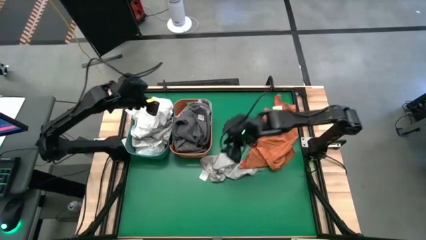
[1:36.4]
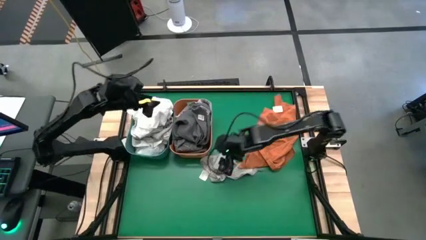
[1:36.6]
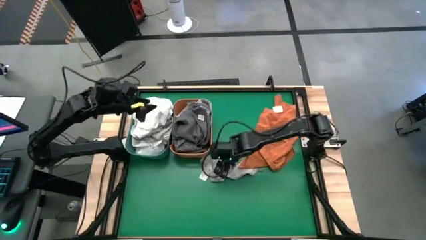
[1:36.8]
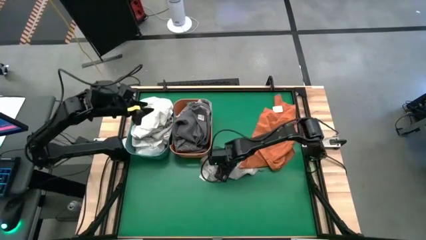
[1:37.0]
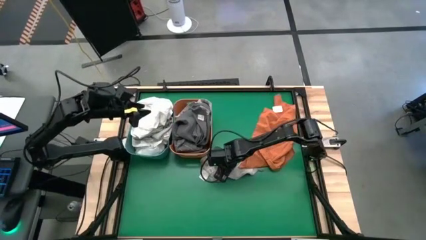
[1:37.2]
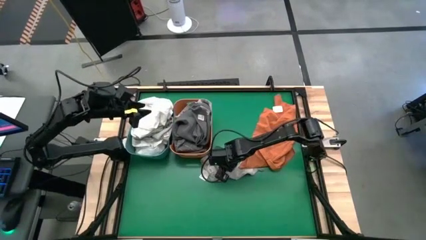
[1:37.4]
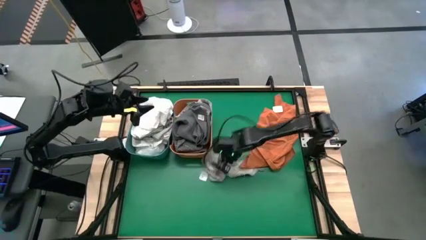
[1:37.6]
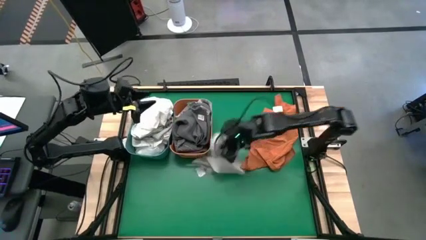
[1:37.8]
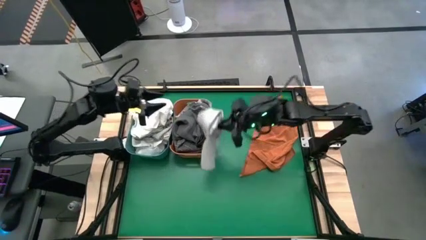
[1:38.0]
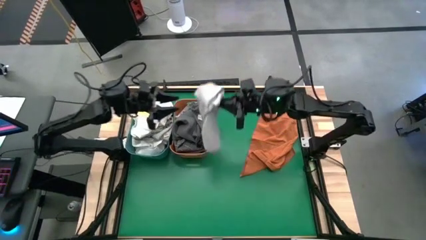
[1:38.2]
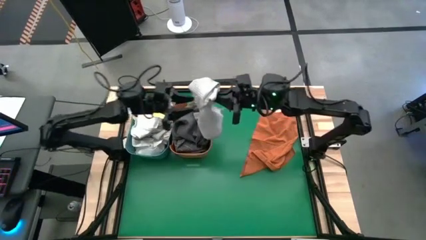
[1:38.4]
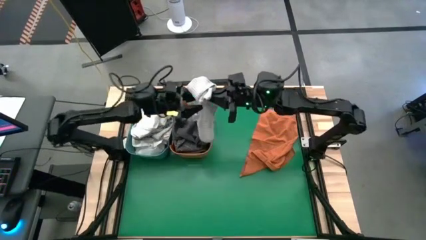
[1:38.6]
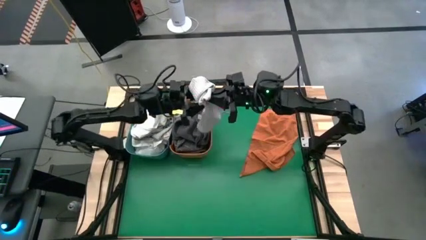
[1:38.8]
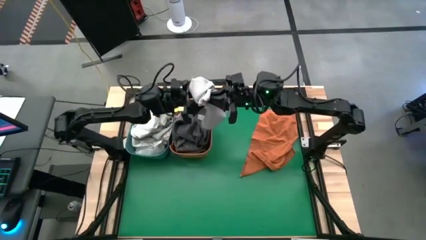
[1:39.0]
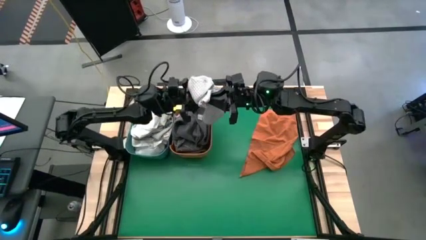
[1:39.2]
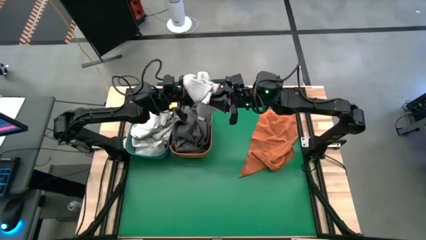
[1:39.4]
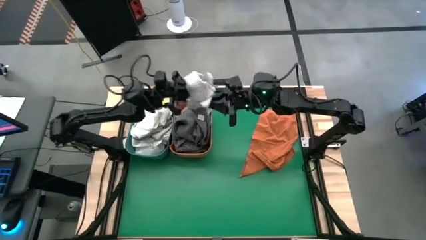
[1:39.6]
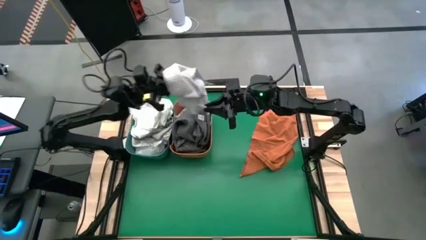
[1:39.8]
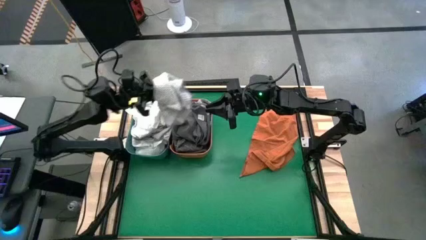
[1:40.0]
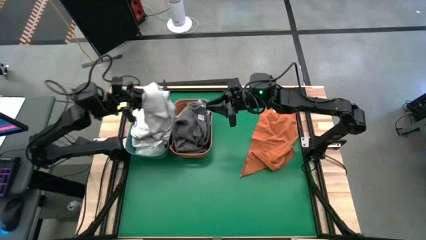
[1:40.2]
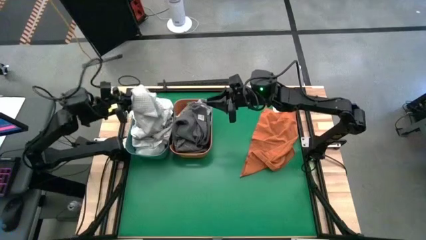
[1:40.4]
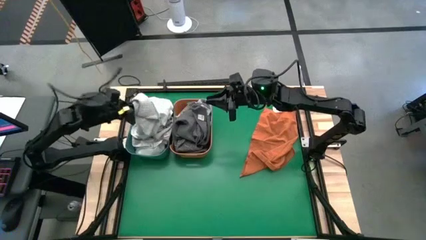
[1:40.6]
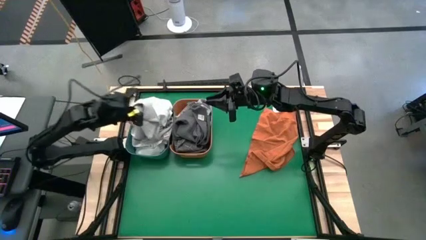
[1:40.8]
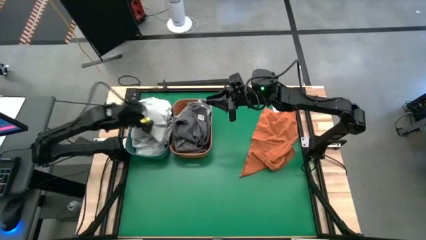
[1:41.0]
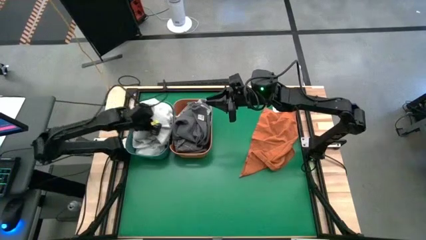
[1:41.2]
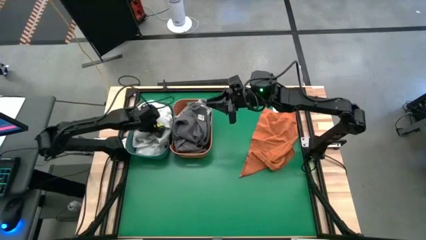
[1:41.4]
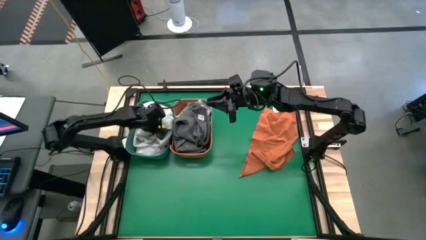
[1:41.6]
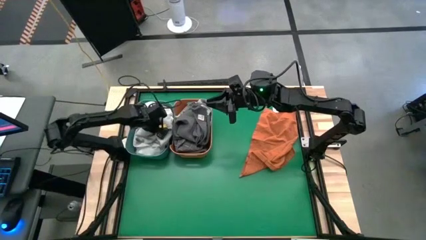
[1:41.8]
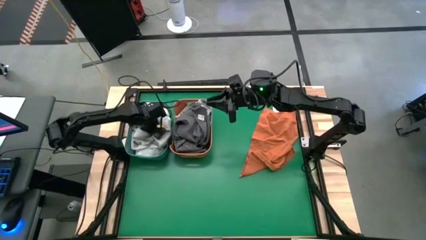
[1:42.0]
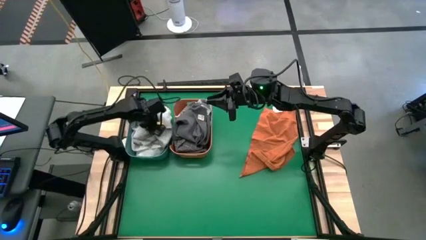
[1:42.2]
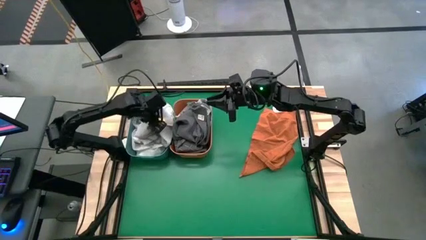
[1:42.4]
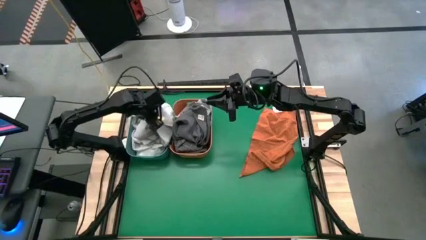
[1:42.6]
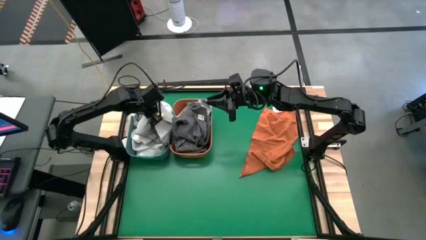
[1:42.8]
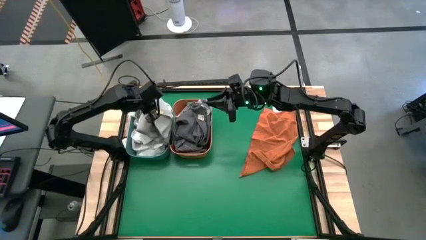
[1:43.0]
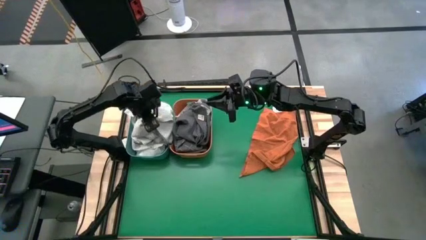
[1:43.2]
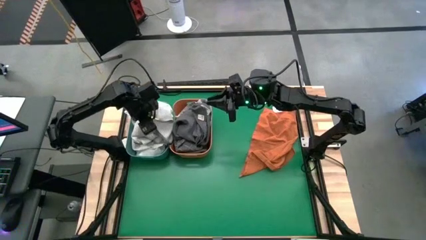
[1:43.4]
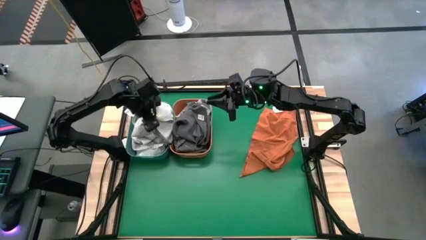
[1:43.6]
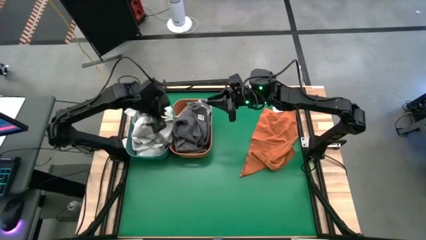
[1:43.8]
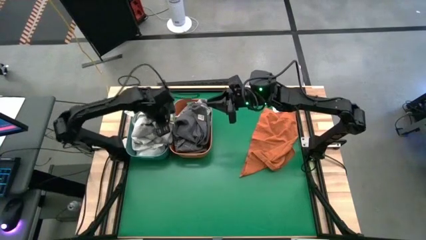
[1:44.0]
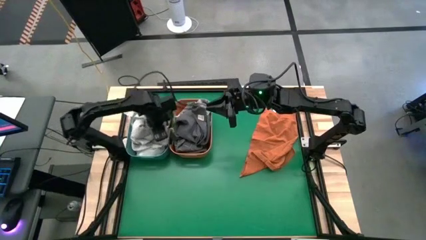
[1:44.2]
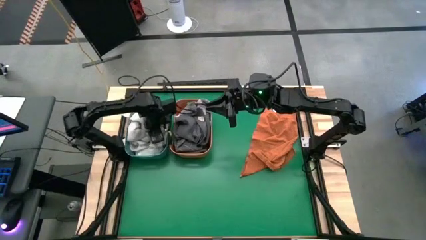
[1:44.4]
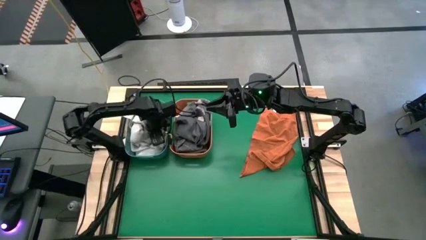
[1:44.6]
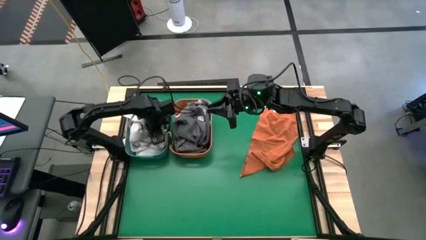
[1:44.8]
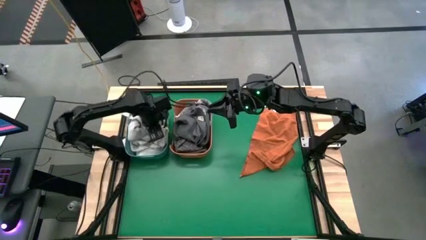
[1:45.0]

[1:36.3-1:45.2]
Task: Sort towels by color in basket
Put the light gray towel into the blue bin

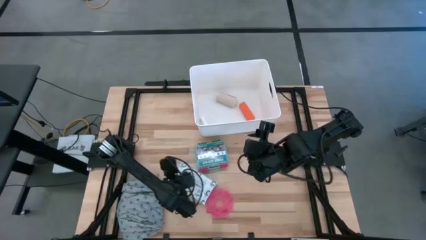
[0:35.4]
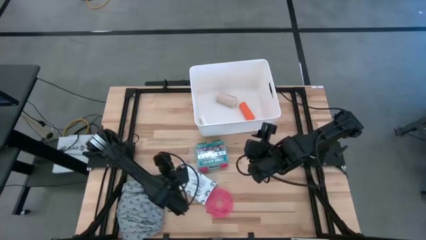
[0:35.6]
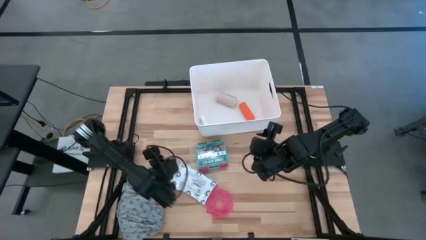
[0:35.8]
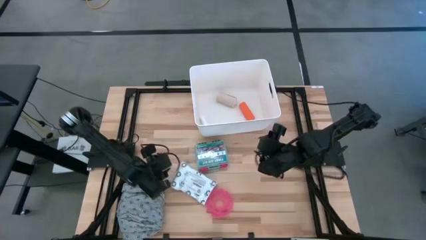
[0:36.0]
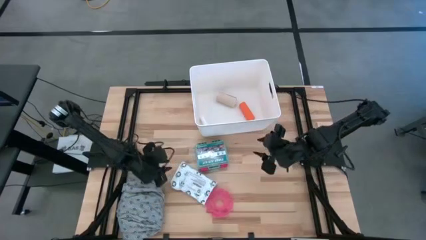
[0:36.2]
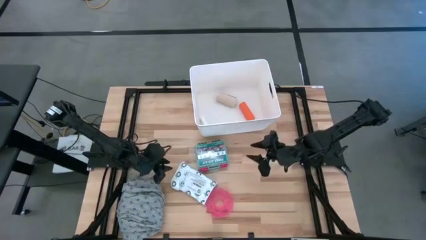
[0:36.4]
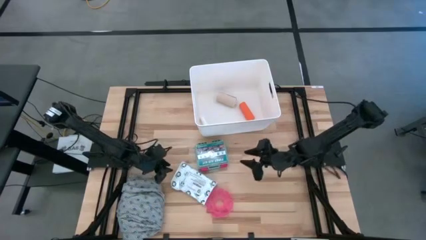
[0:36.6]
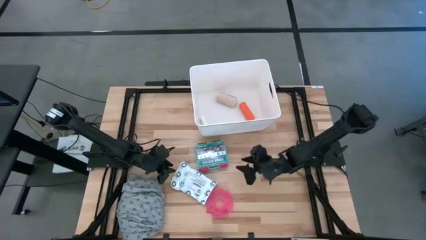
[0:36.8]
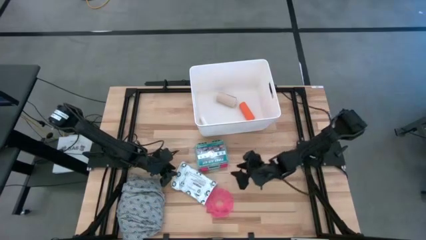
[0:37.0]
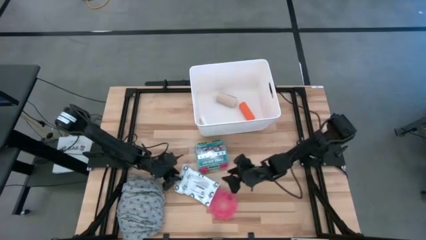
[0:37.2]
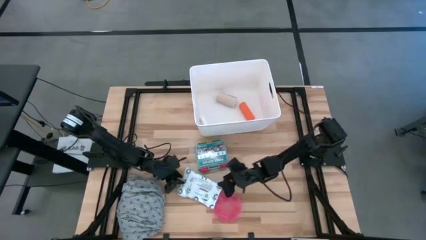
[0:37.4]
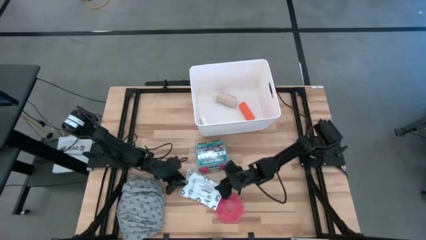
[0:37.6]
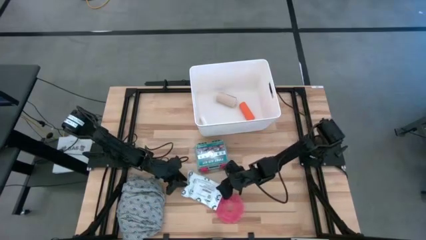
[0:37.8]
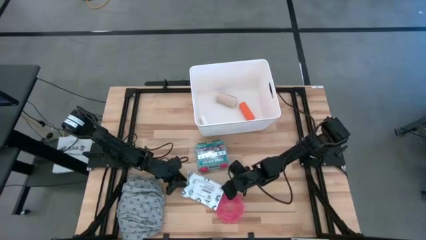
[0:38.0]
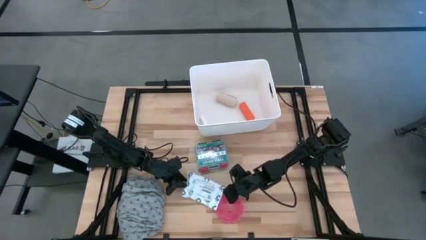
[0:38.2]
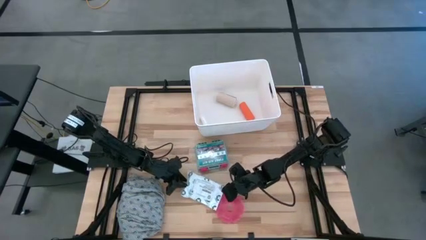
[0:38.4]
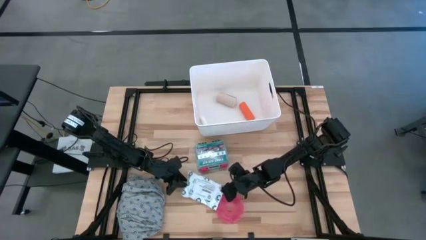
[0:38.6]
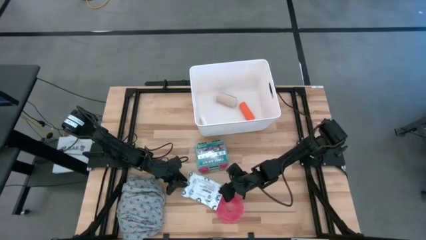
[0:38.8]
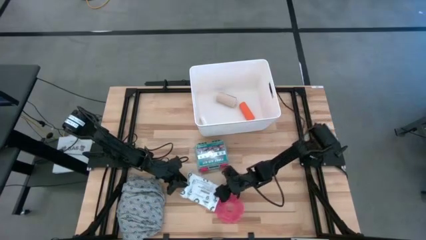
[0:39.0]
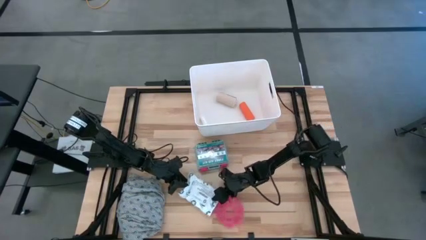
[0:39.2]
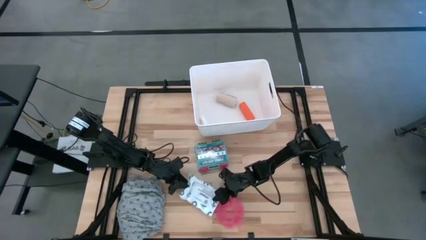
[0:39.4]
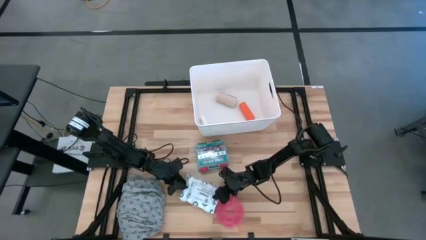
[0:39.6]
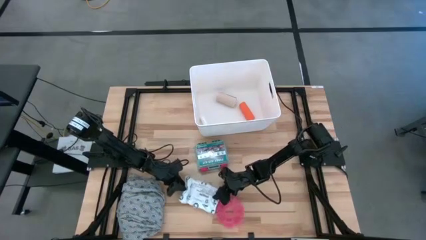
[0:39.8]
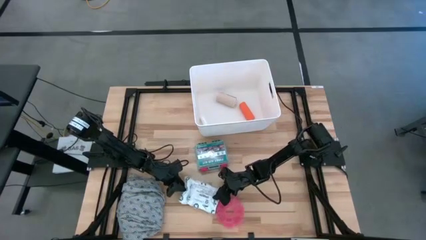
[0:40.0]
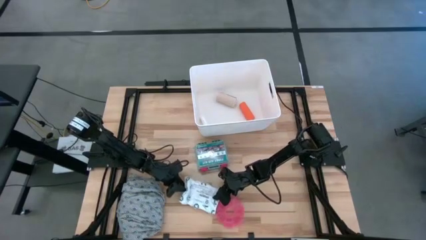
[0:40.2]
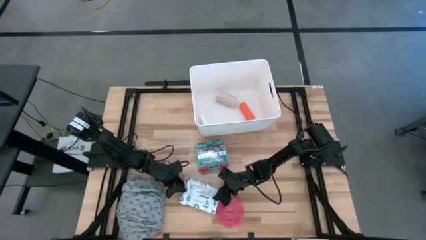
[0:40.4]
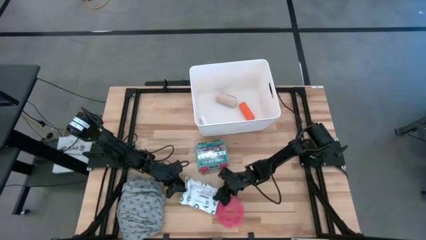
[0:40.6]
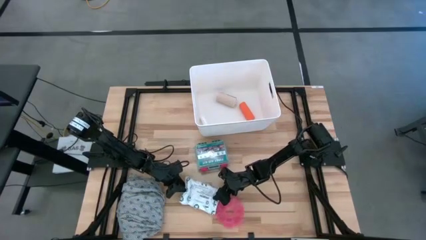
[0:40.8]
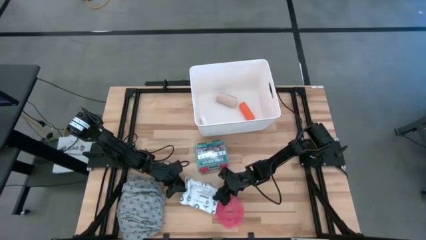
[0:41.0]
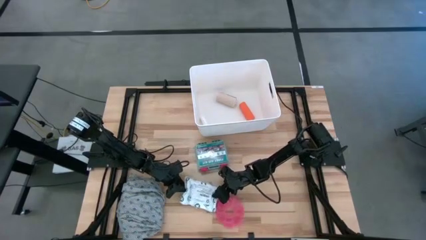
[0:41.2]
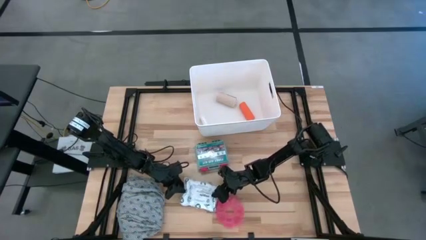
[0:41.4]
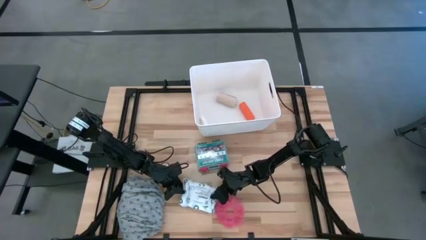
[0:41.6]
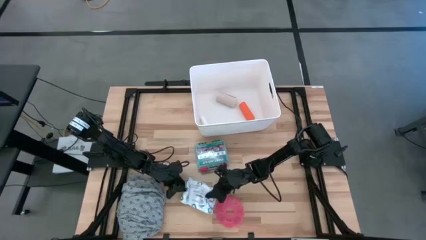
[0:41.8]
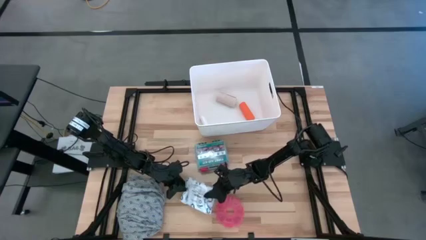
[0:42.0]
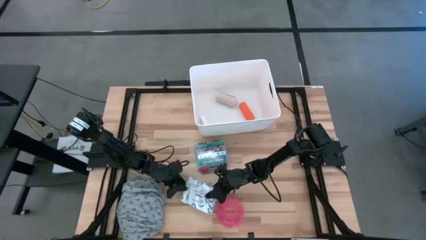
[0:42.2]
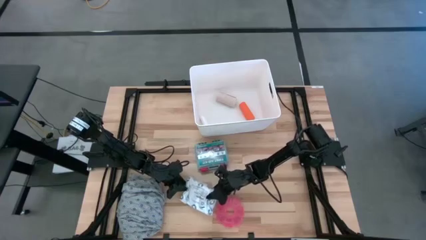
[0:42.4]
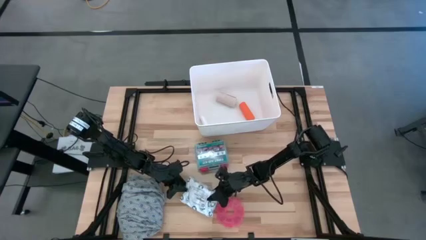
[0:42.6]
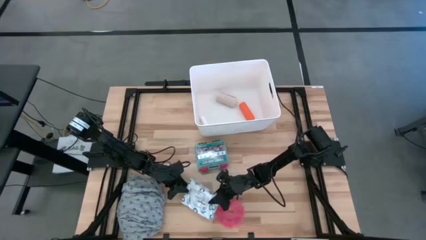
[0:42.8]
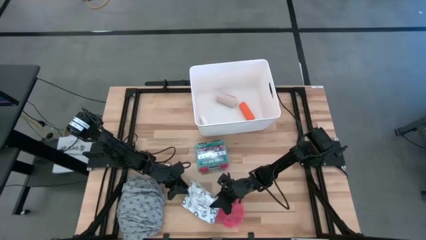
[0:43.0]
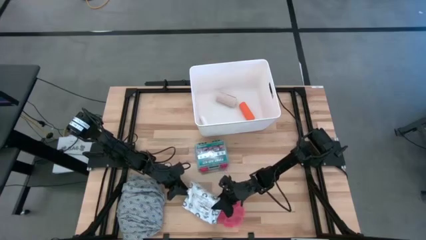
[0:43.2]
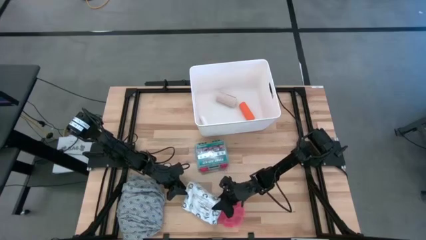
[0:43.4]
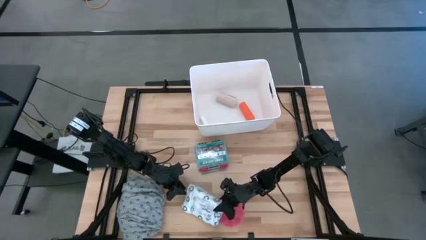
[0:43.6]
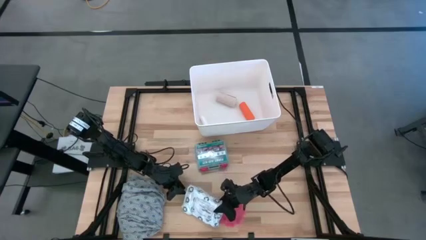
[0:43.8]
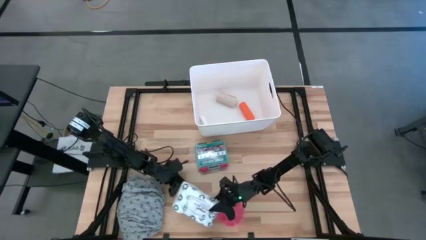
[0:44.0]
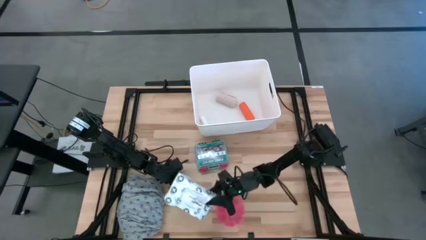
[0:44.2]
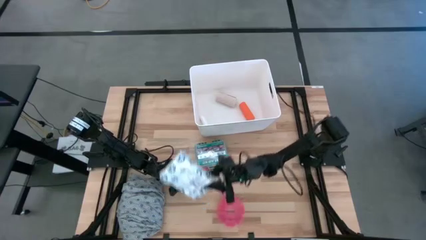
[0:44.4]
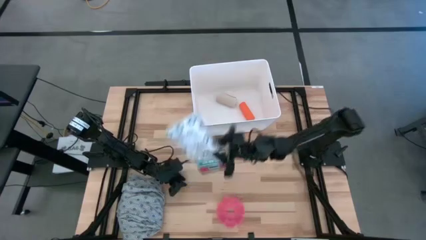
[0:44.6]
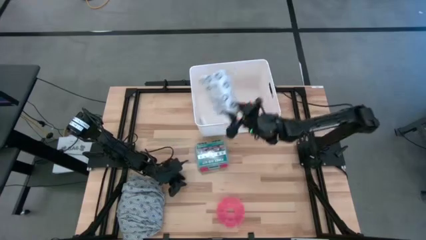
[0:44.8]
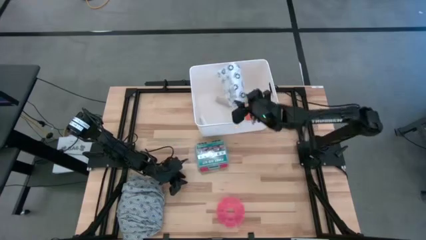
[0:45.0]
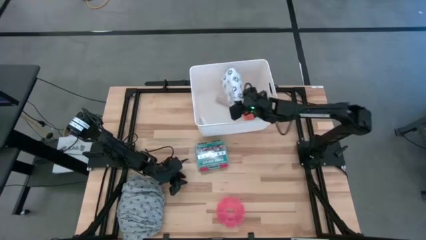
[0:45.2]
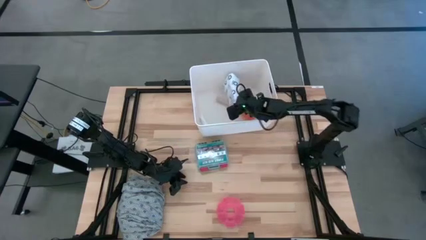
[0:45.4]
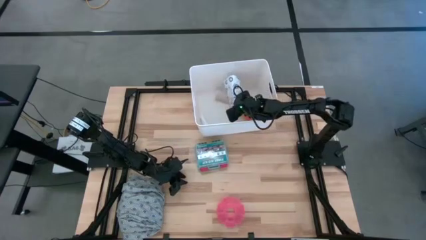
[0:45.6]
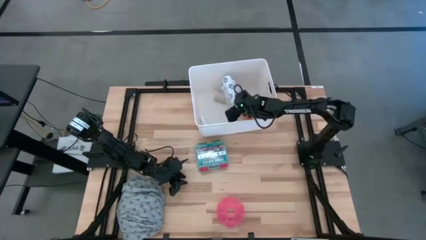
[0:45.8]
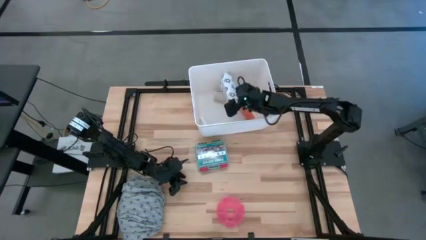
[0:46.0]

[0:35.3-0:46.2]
Task: Pick & place medical supplies in basket/bin
Put the mailer bag into the white bin
